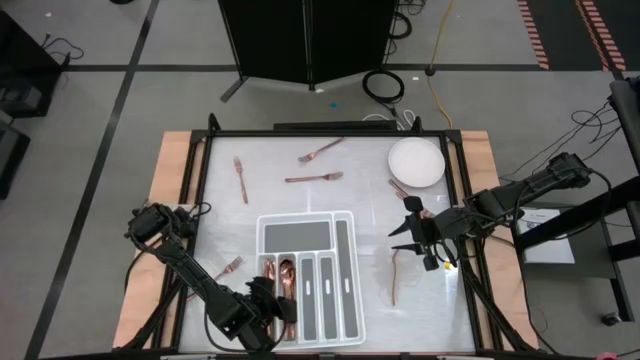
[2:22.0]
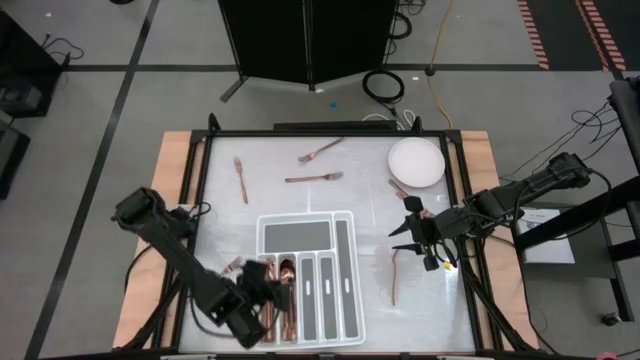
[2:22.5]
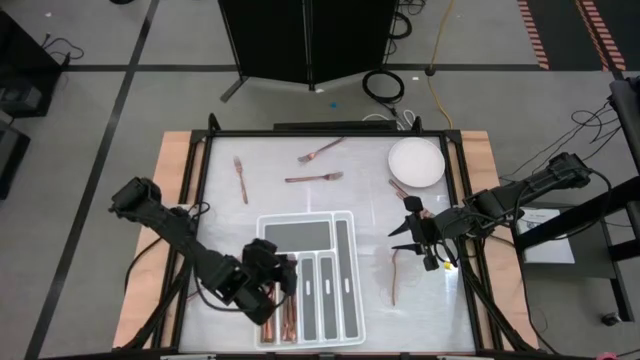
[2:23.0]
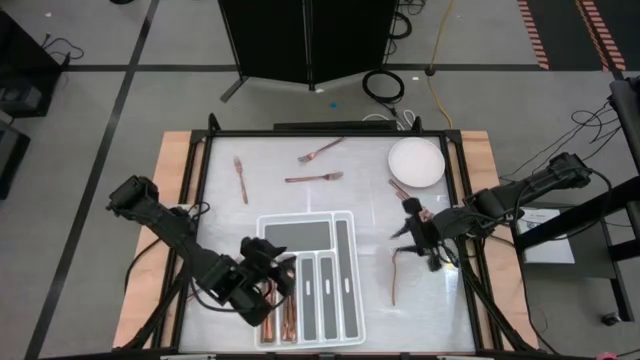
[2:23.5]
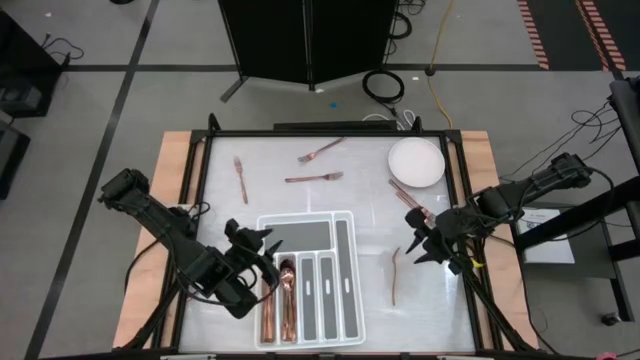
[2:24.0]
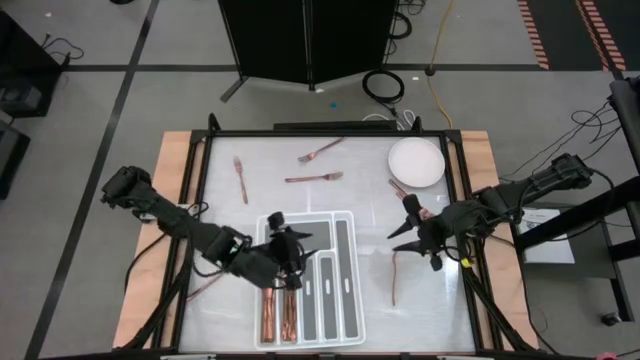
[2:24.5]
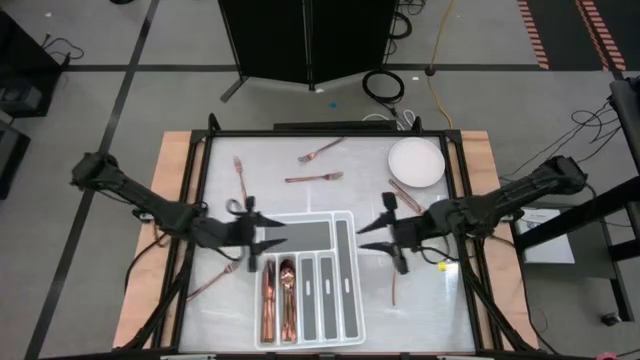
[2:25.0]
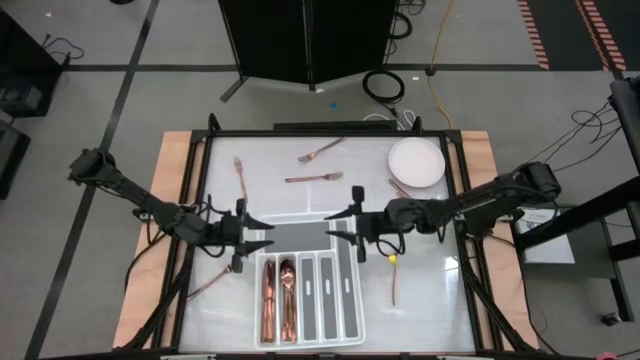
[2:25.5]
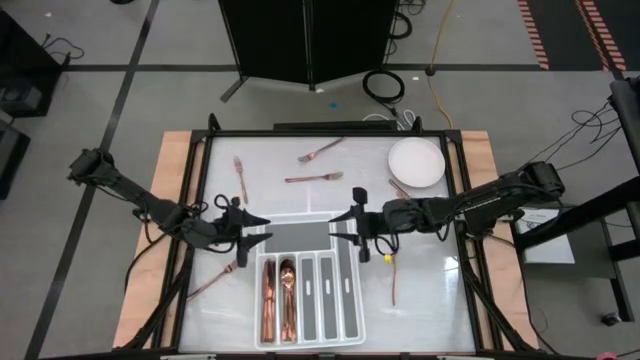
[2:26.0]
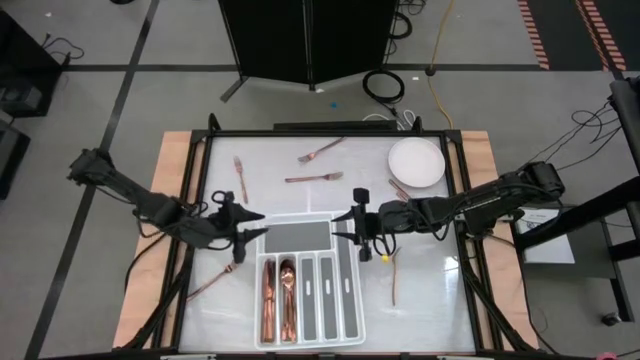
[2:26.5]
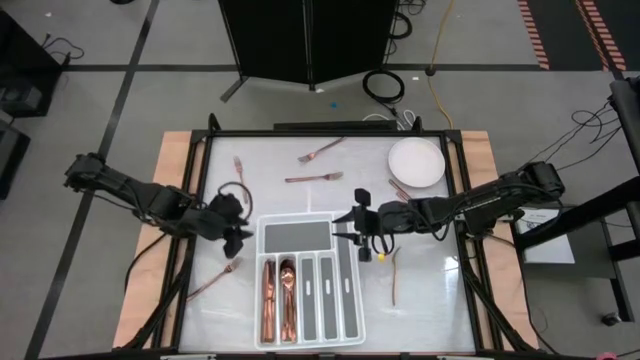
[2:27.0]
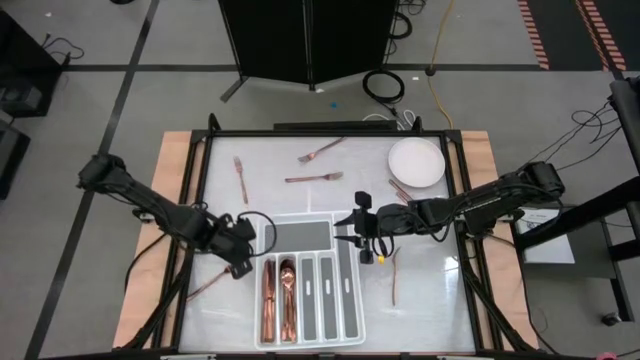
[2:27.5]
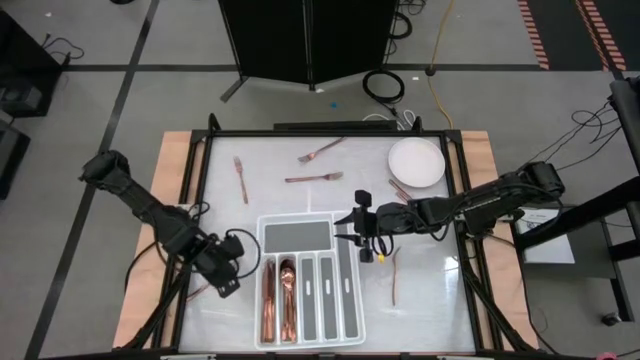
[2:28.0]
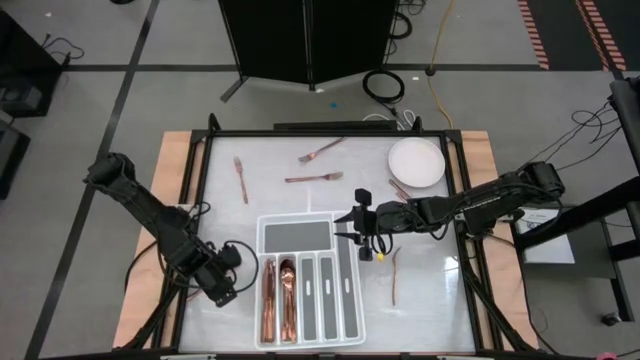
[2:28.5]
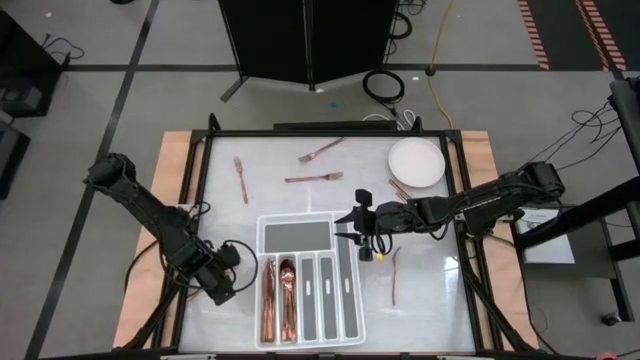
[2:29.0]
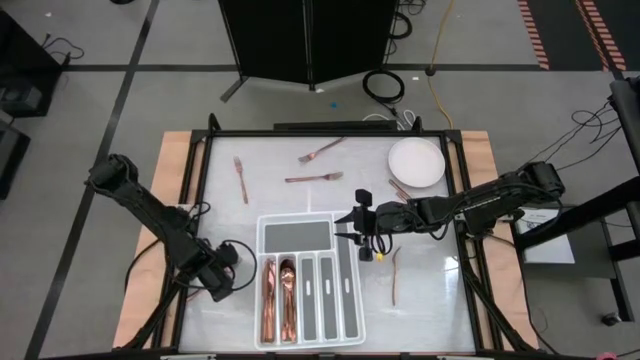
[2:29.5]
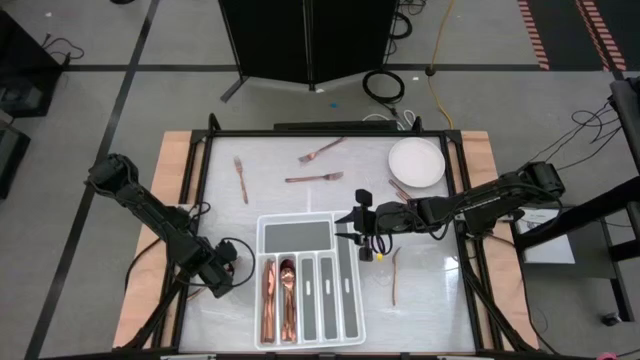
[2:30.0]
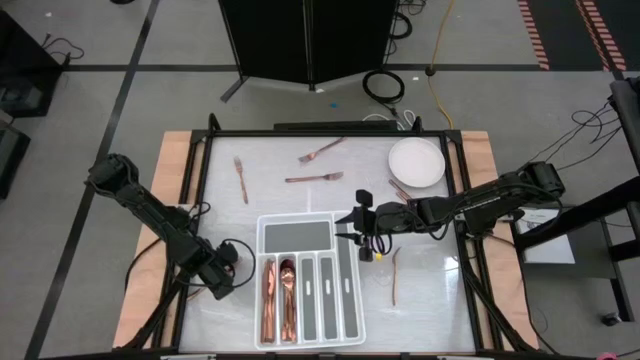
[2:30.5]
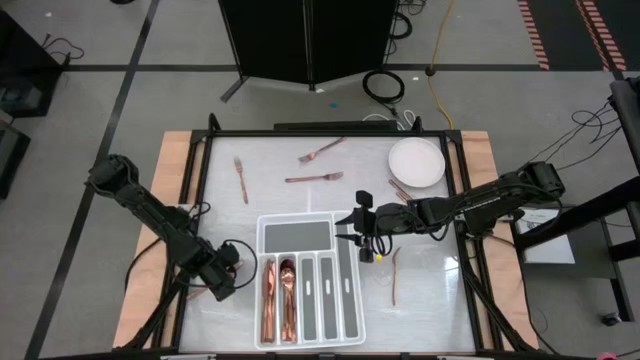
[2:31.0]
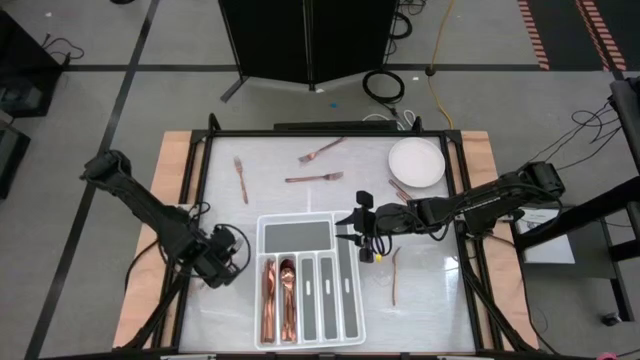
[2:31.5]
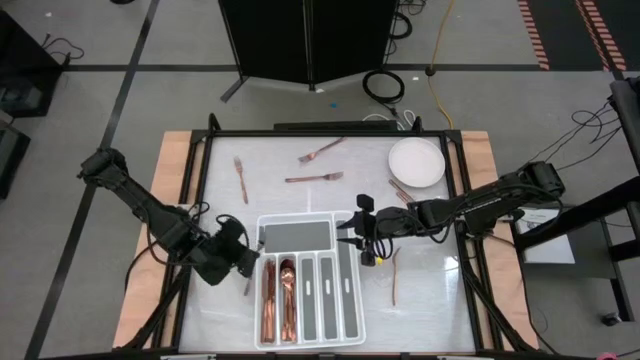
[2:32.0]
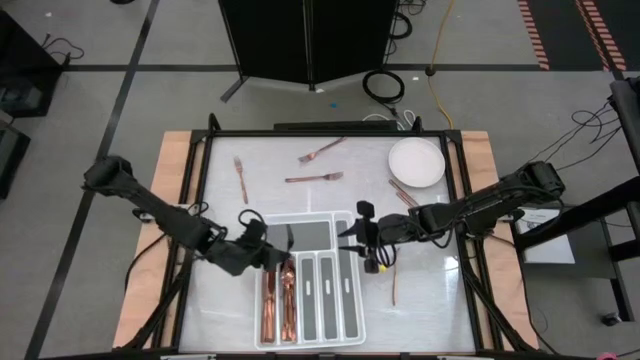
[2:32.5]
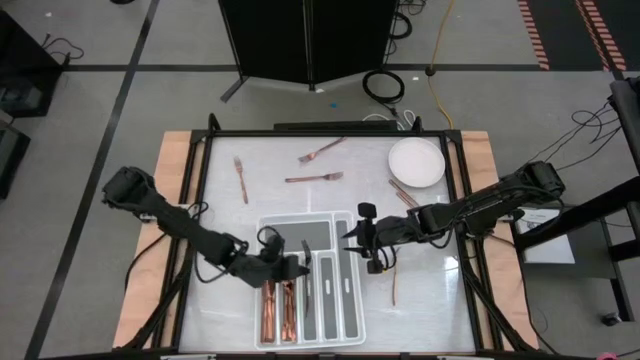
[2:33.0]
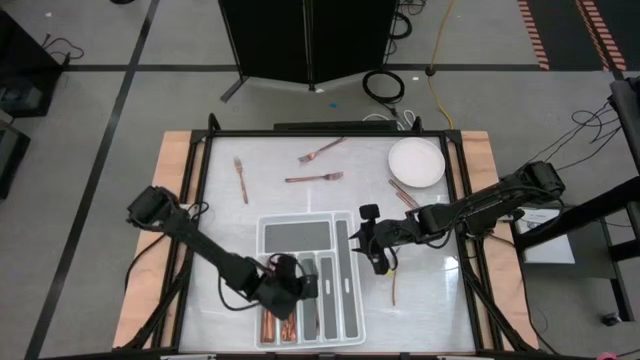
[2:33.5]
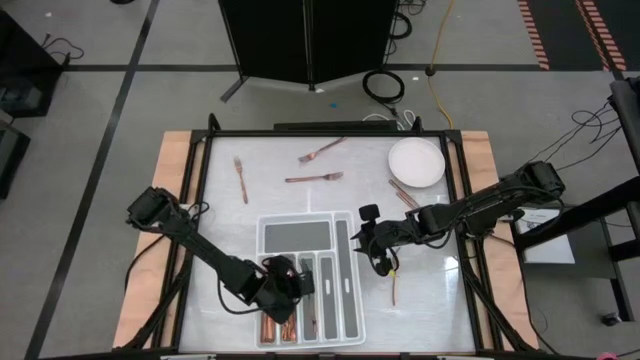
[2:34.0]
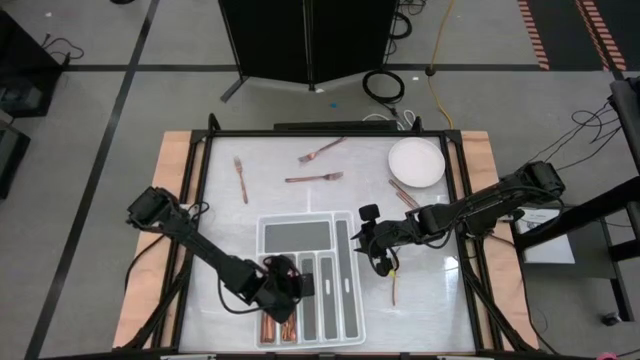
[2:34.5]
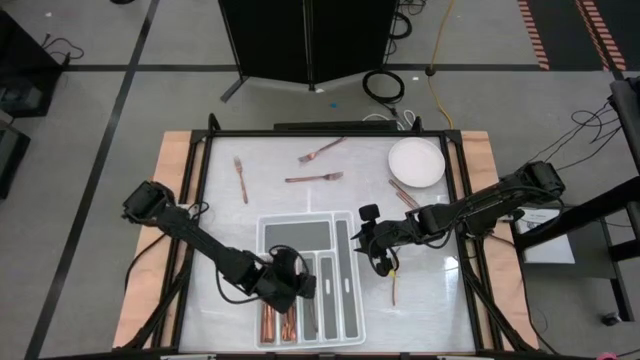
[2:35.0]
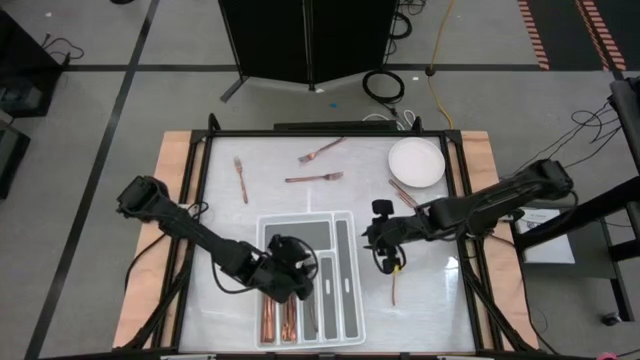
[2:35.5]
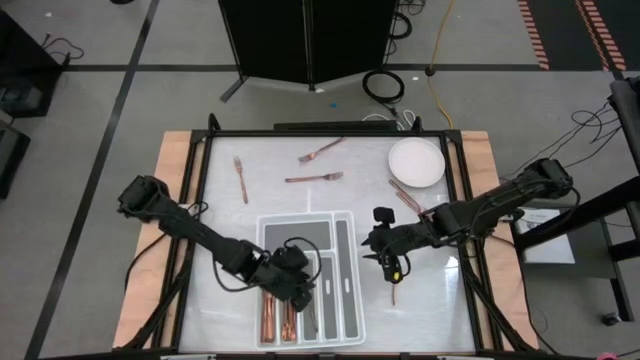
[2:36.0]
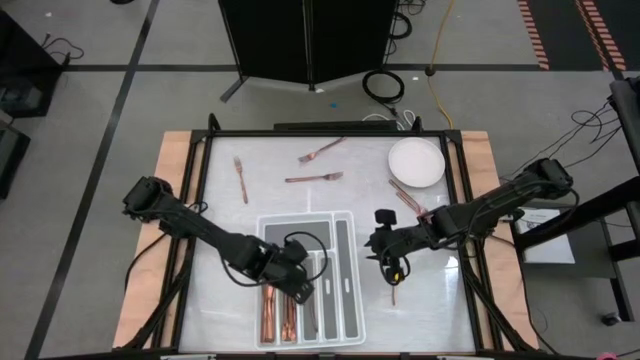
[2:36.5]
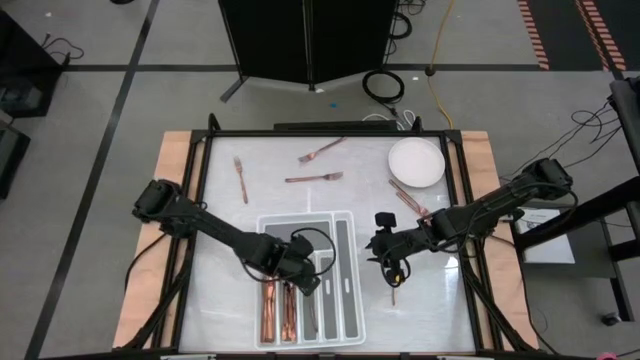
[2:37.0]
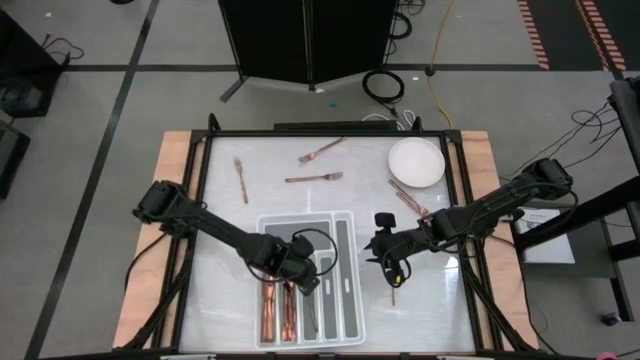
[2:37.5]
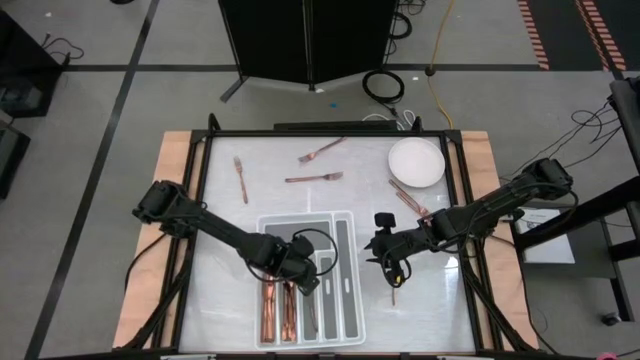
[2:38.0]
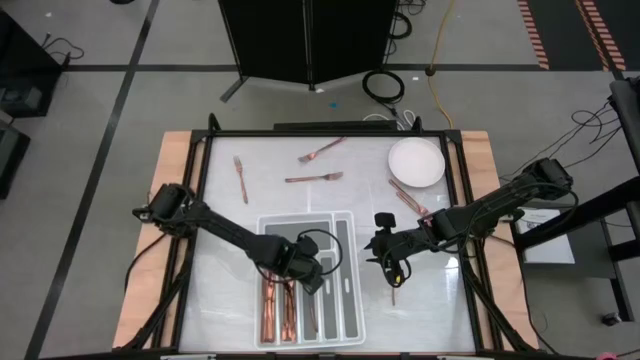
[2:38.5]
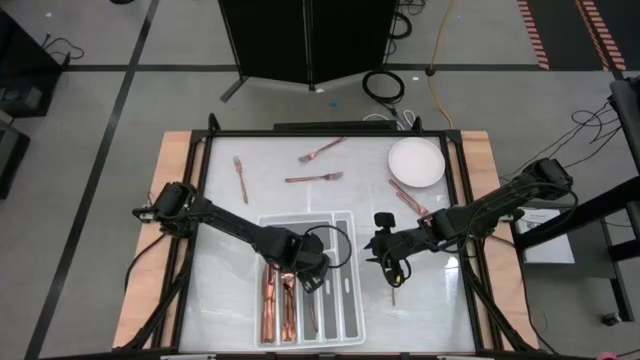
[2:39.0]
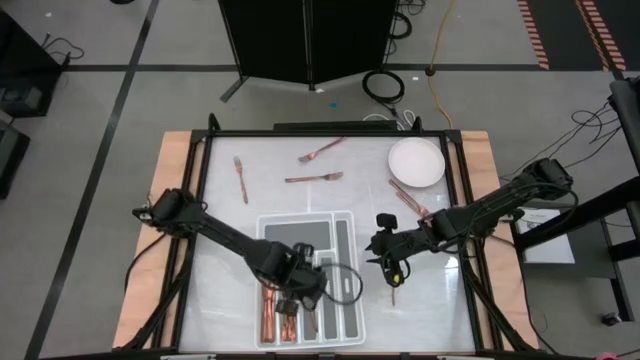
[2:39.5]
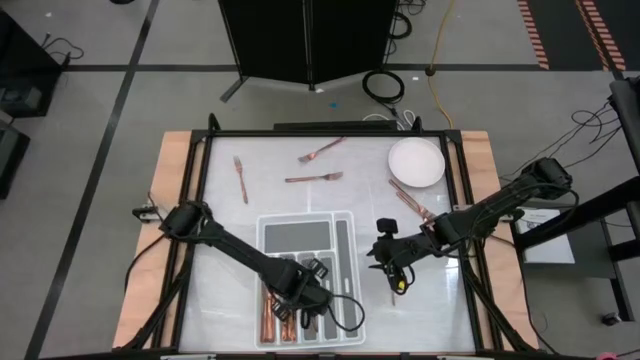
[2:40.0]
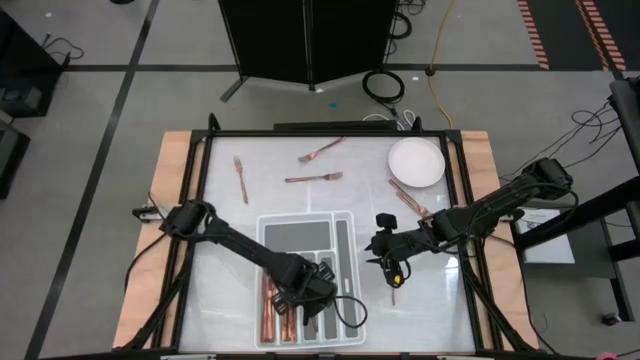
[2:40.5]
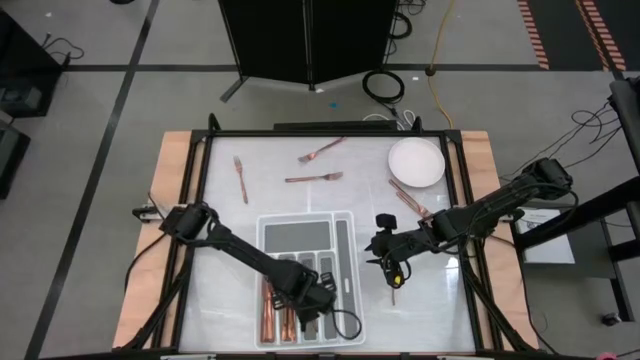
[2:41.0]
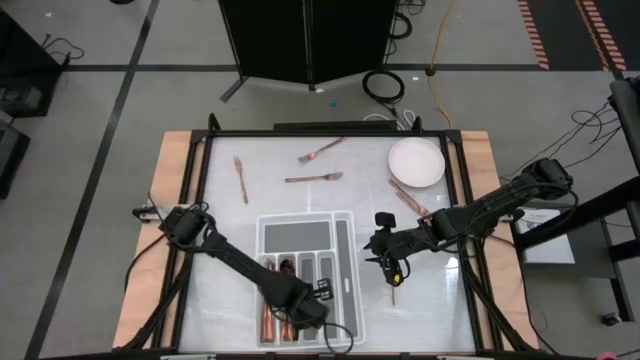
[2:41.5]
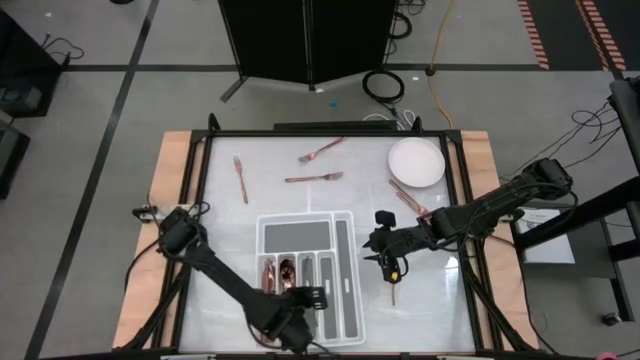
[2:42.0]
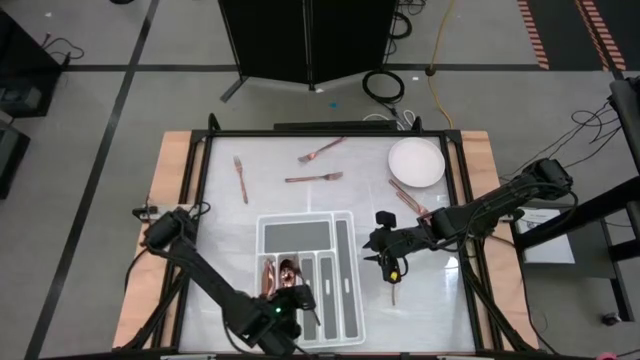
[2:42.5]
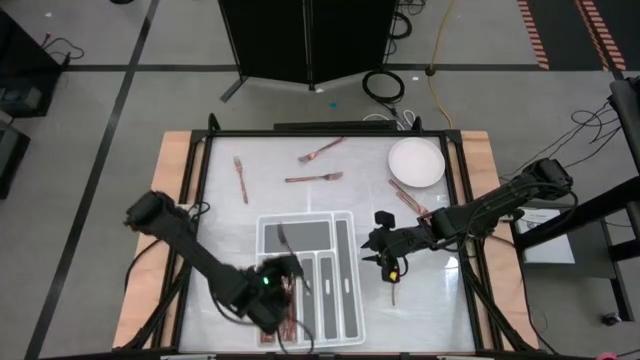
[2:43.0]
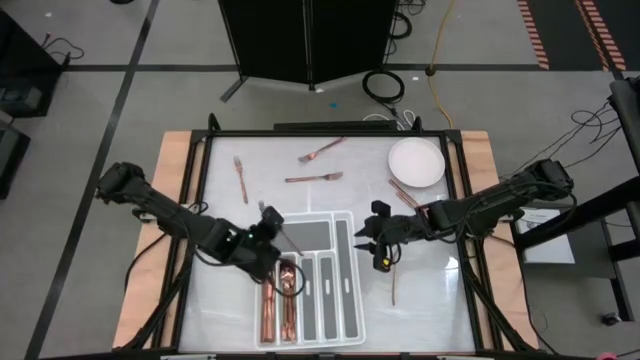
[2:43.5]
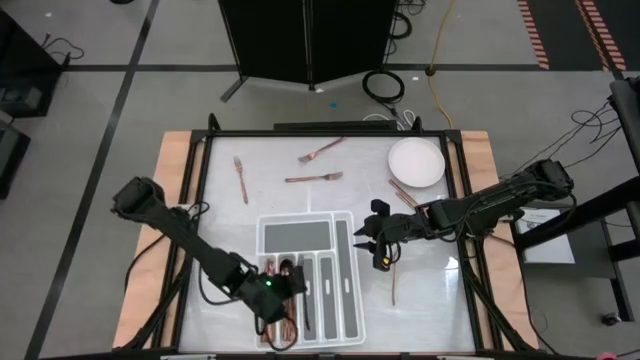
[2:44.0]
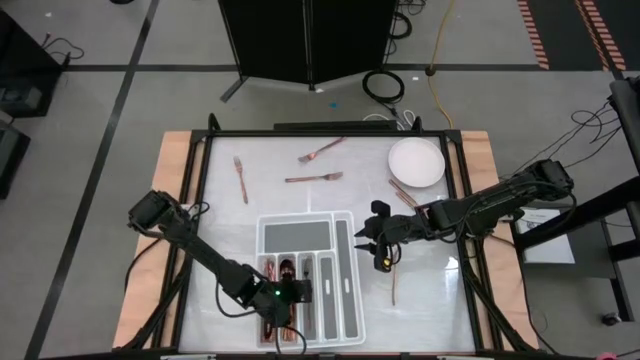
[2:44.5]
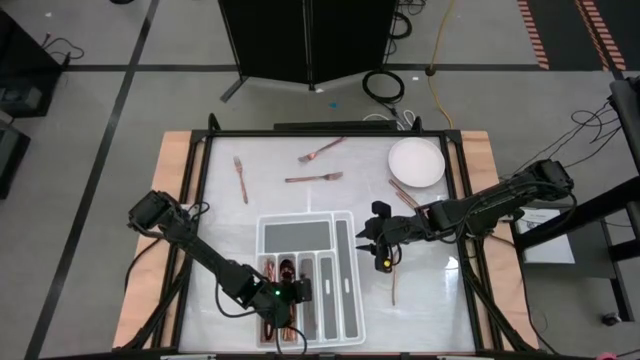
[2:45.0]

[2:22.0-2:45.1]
Task: Sort silverware
Put the fork into the silverware tray
